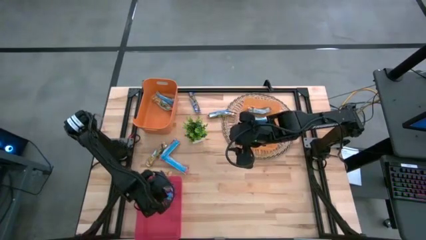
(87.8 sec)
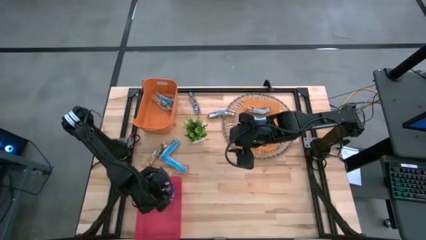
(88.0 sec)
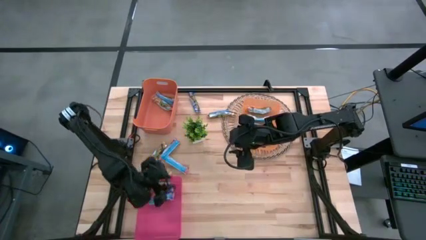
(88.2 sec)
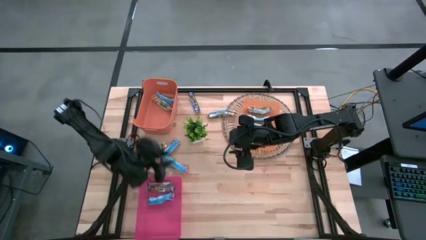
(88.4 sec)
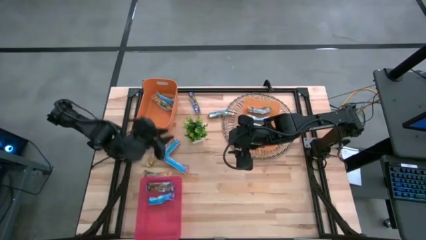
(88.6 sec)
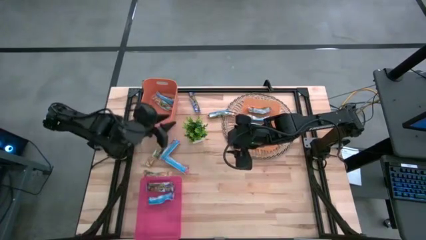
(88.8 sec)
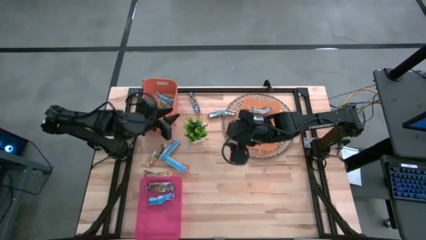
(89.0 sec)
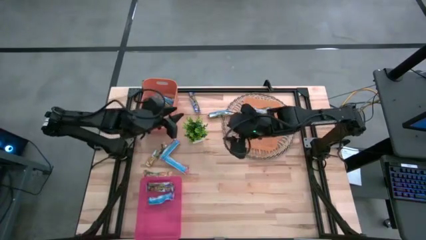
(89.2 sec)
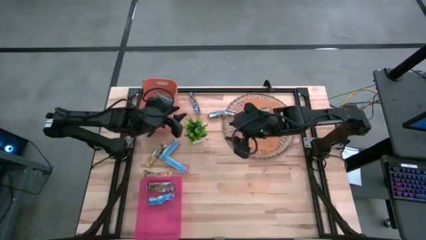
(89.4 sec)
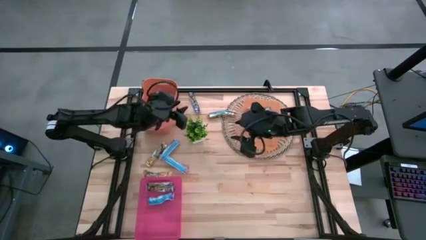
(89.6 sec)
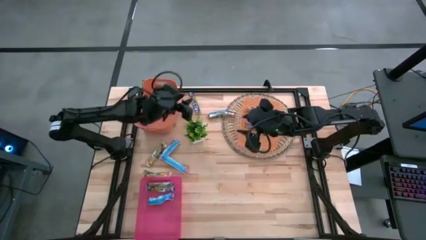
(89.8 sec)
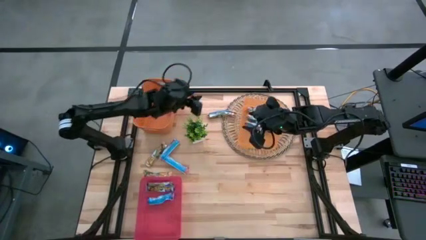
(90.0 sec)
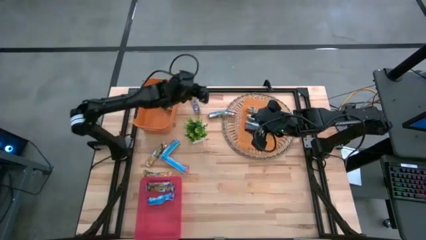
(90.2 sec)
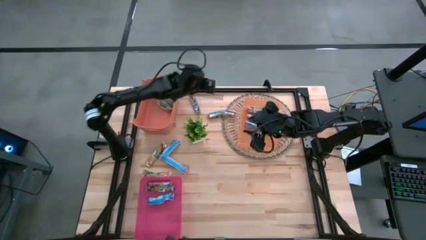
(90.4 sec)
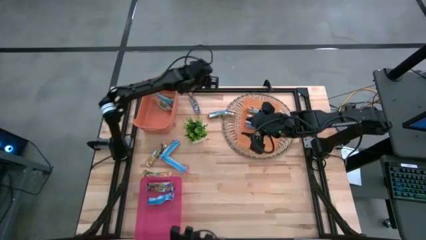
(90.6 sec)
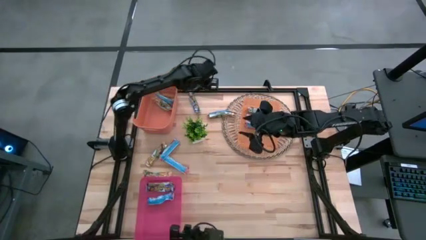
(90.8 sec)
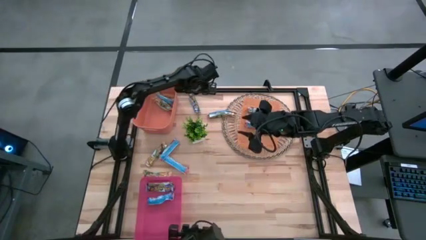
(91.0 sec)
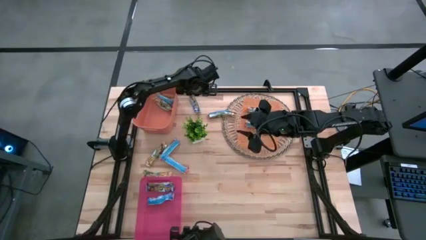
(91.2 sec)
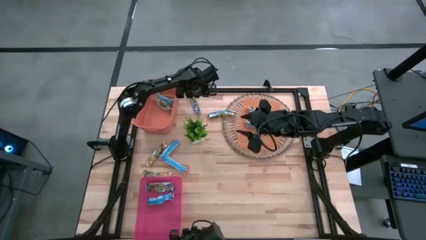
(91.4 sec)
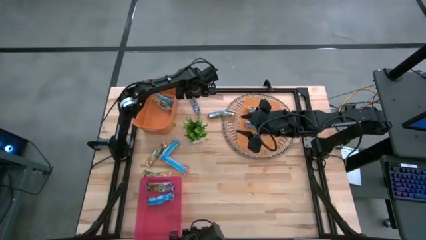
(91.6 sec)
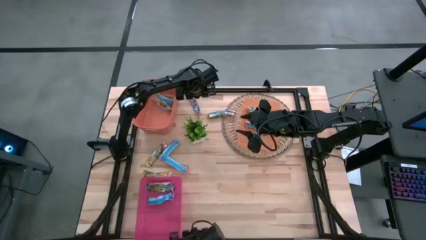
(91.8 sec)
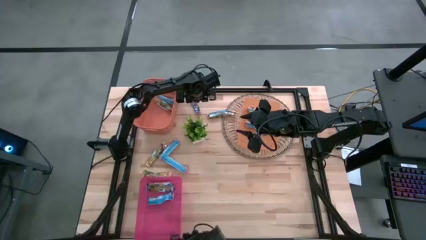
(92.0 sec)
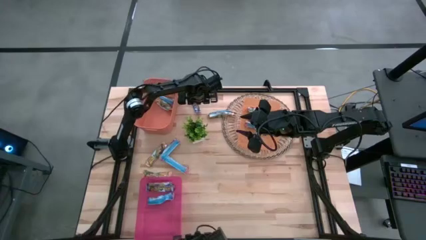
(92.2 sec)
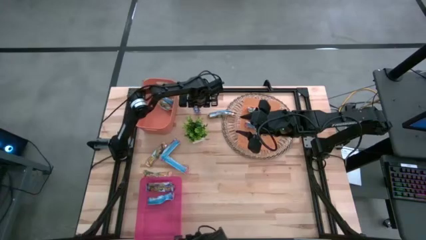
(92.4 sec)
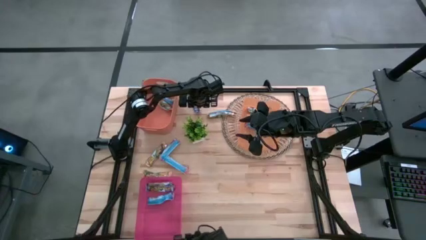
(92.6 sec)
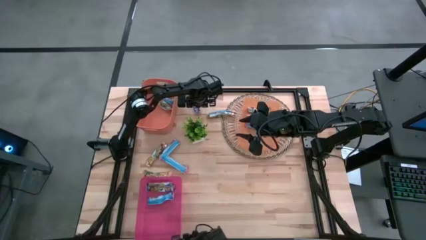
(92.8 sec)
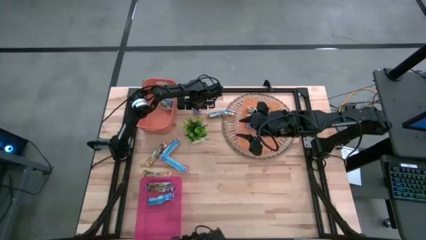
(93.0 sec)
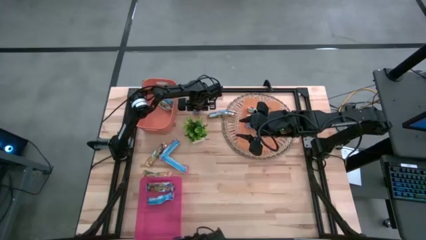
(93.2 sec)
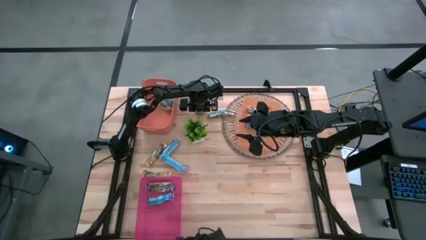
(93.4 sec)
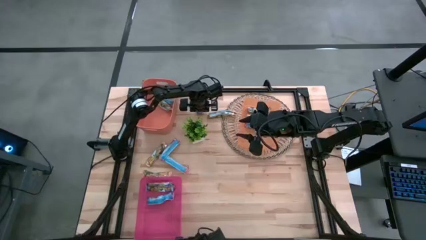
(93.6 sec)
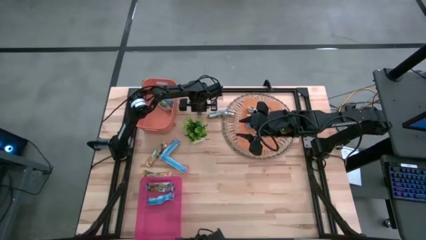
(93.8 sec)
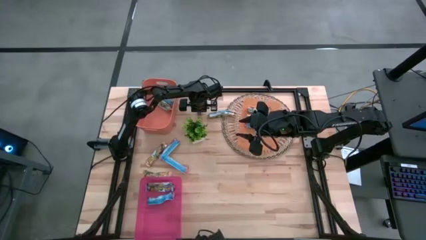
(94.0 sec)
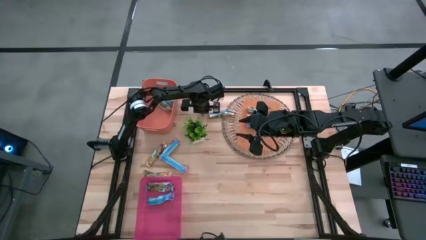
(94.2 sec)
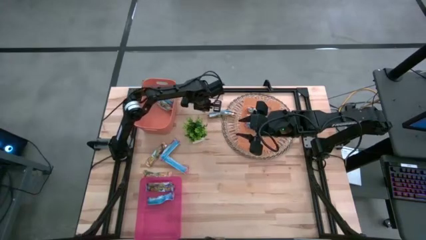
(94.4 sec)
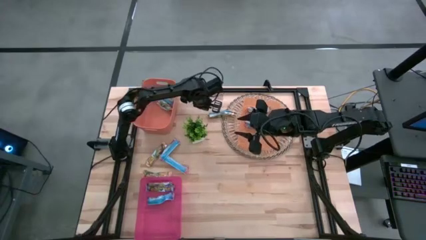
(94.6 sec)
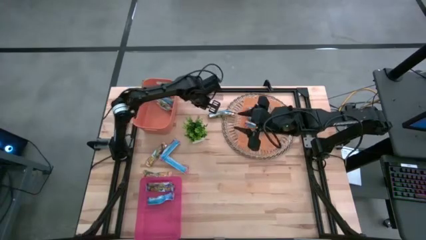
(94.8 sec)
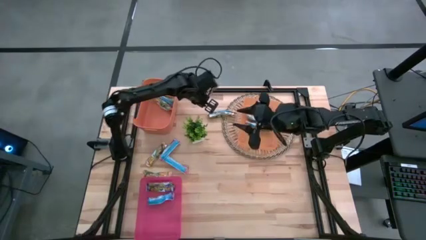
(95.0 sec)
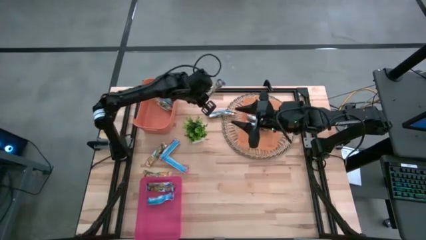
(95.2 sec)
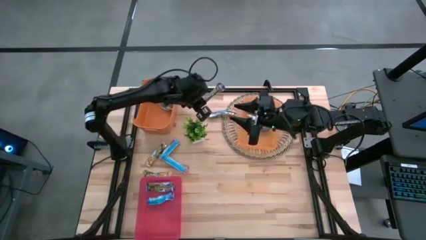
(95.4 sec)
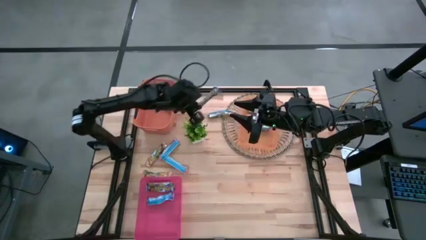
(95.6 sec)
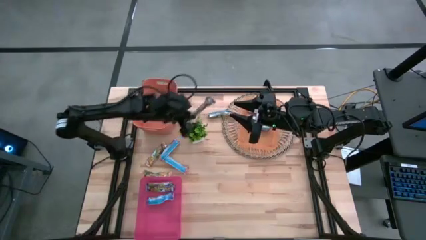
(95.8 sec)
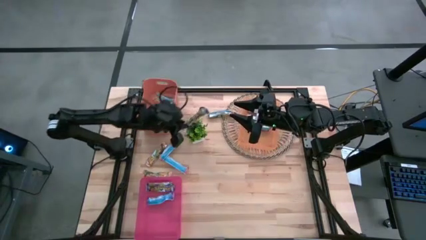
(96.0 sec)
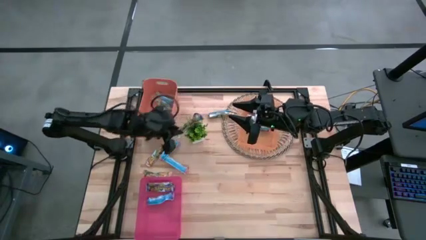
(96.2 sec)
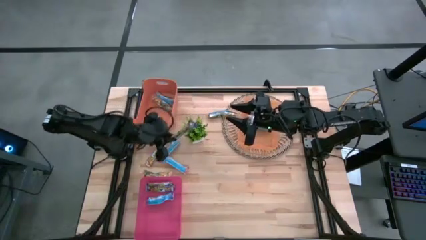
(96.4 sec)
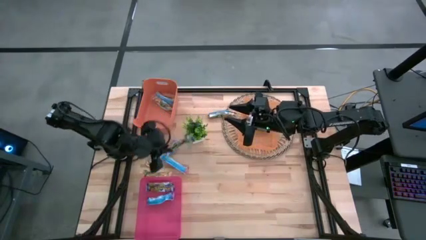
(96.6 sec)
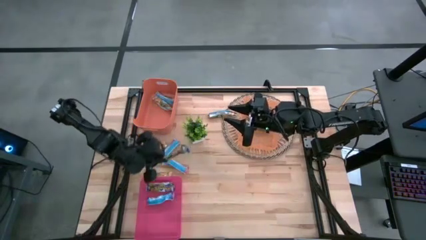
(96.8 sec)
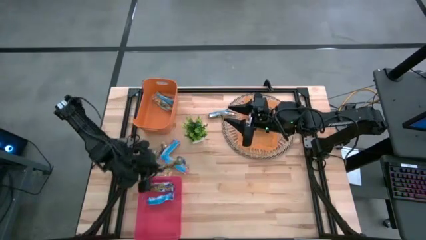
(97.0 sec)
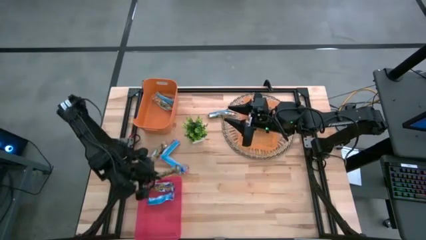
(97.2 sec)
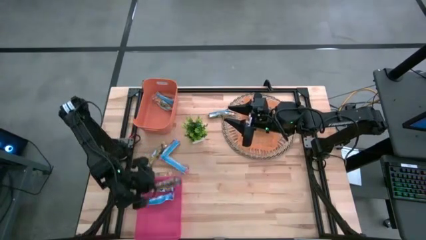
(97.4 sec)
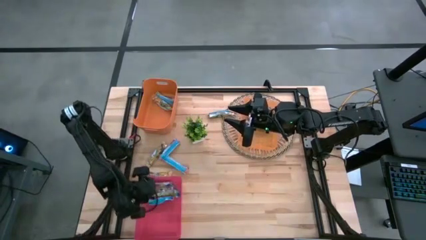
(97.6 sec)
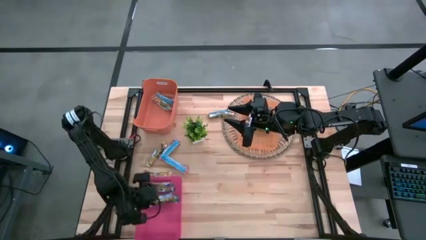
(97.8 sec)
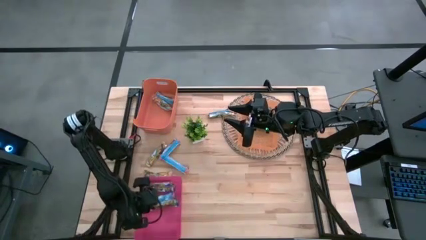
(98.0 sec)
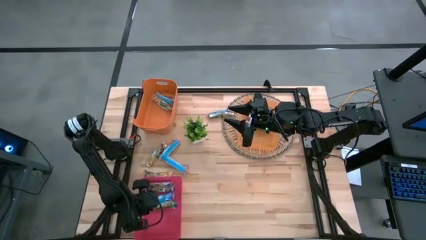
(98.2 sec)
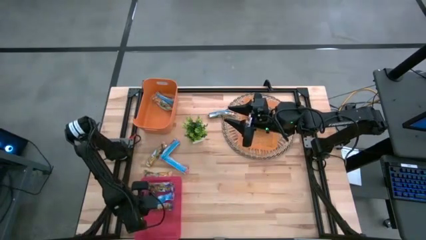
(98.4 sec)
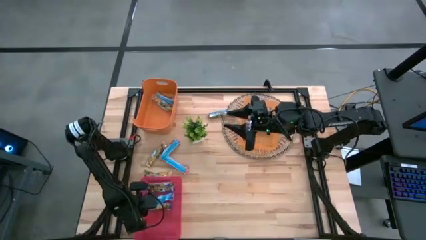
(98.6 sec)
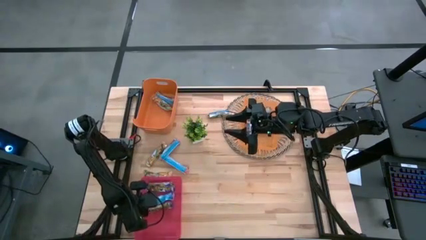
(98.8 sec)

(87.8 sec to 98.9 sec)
Task: Pick and place Granola Bars by type
Put the blue granola bar into the pink bin
